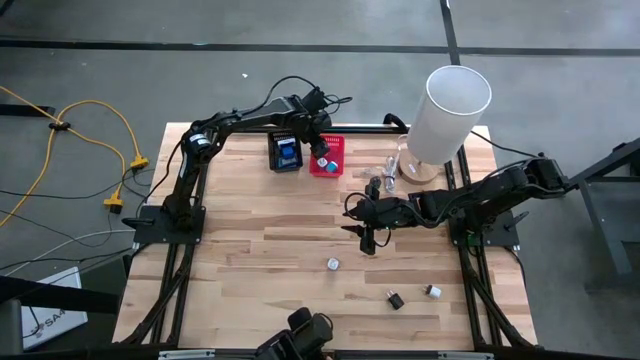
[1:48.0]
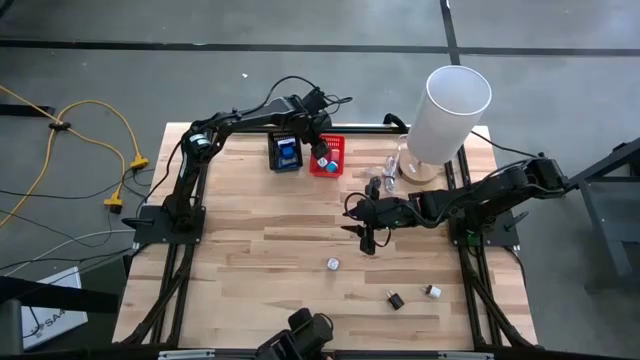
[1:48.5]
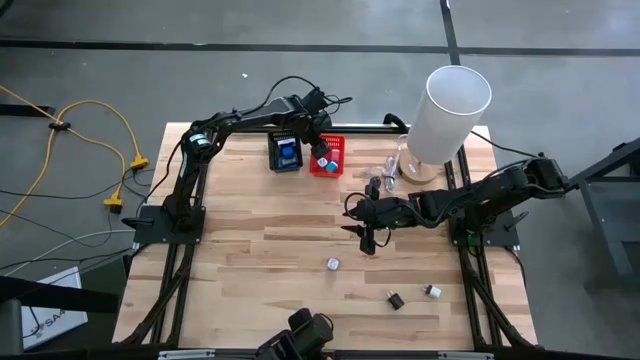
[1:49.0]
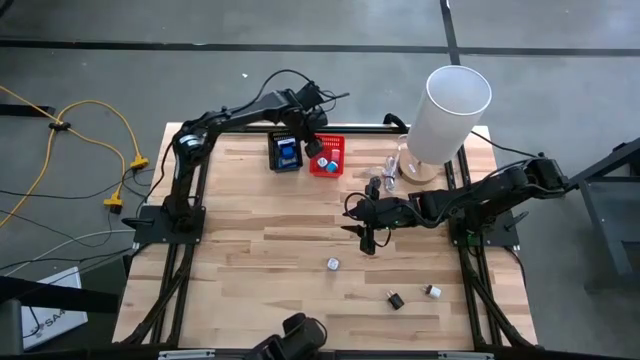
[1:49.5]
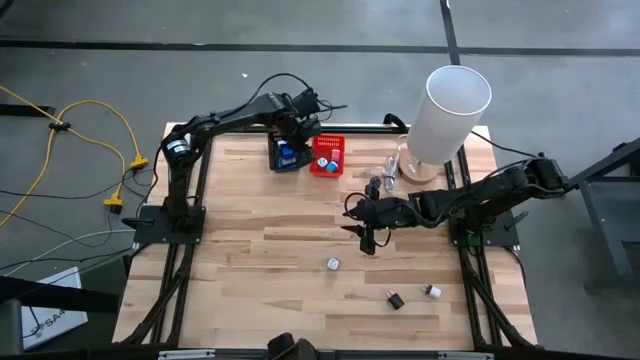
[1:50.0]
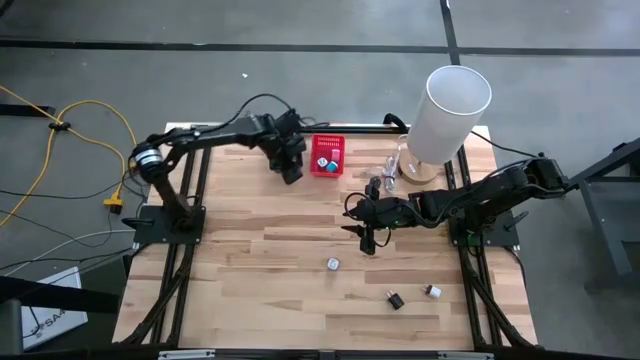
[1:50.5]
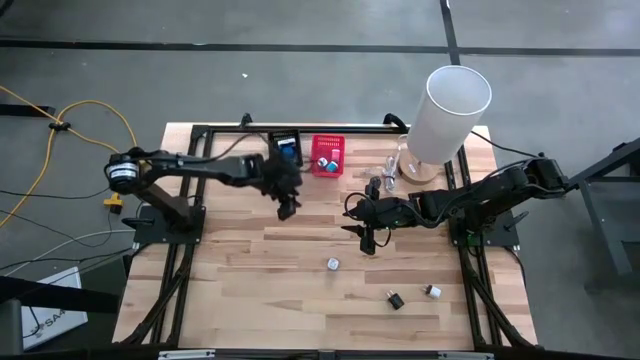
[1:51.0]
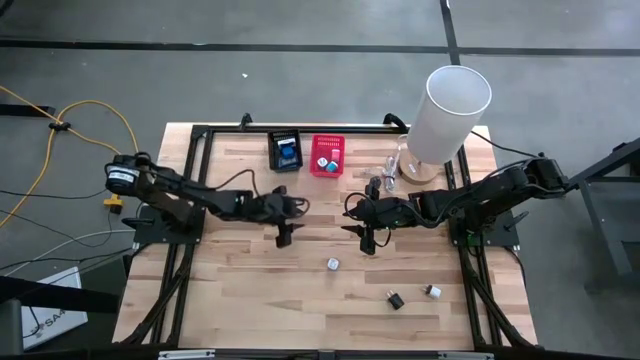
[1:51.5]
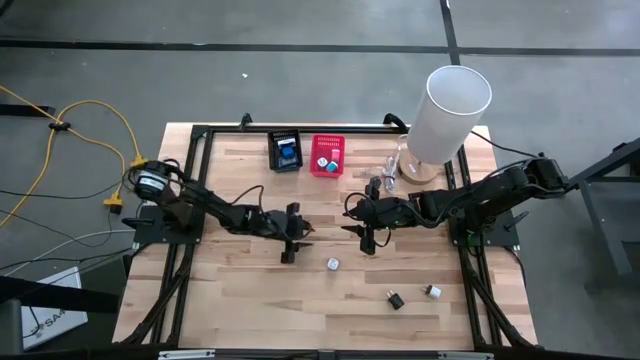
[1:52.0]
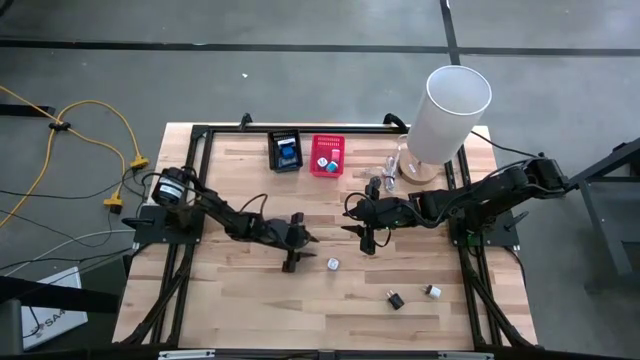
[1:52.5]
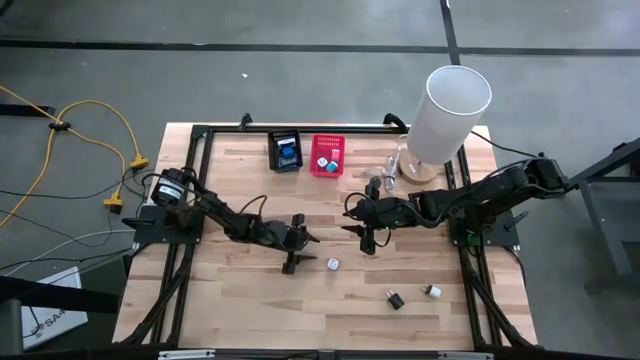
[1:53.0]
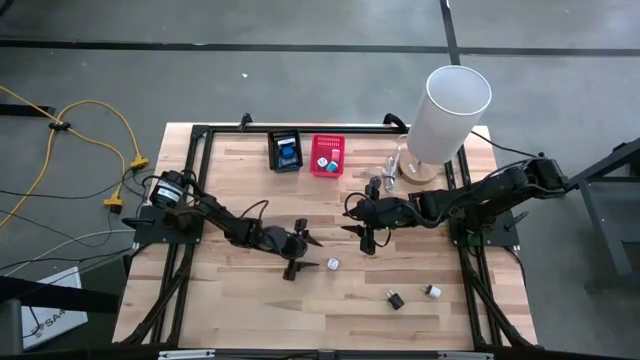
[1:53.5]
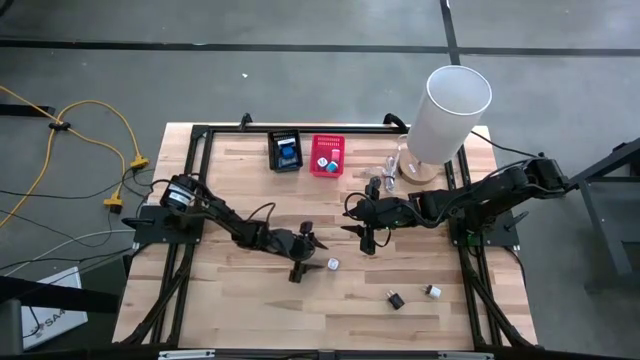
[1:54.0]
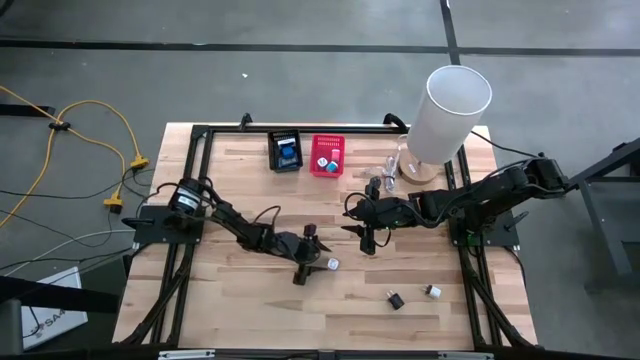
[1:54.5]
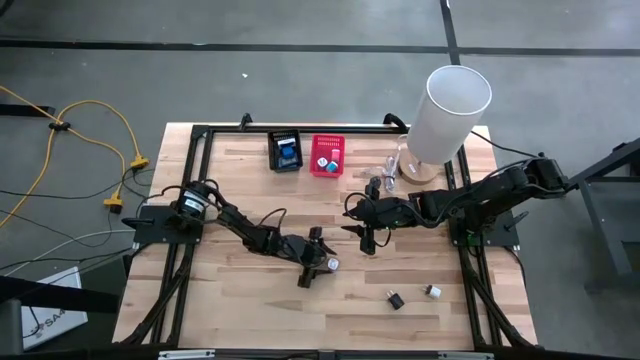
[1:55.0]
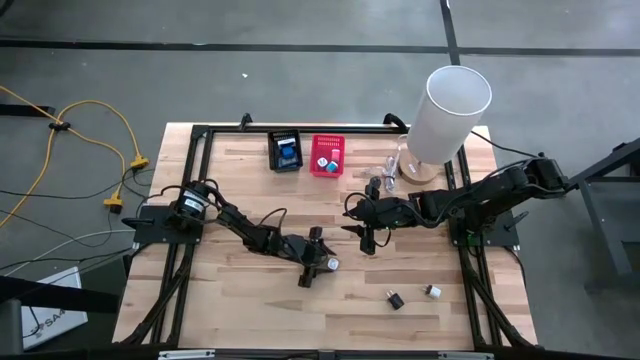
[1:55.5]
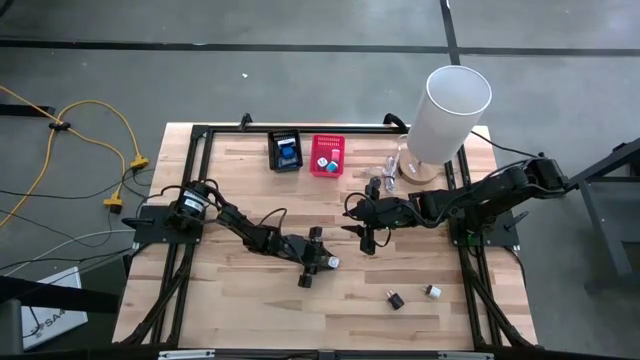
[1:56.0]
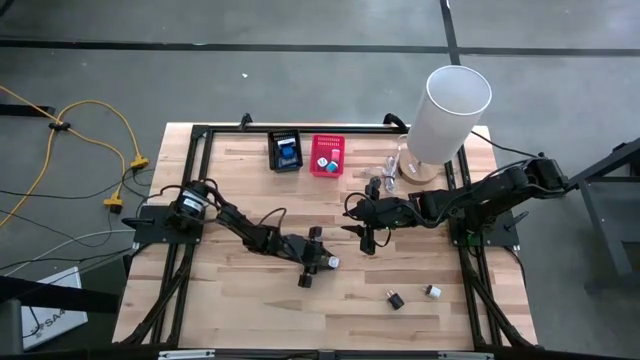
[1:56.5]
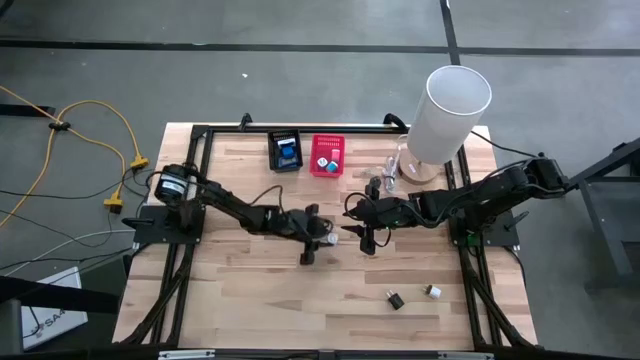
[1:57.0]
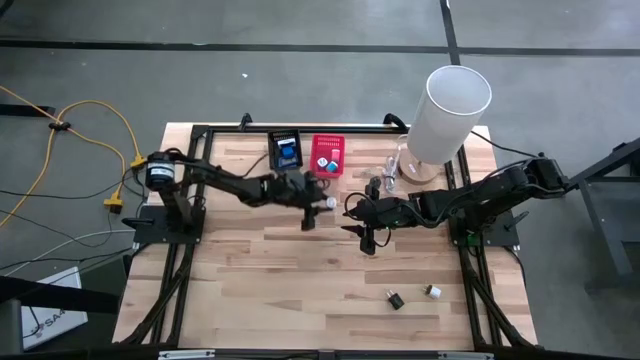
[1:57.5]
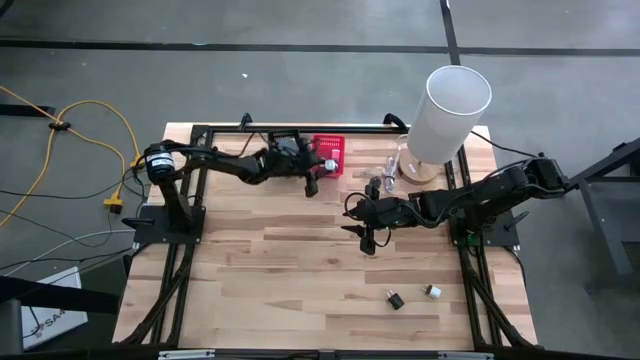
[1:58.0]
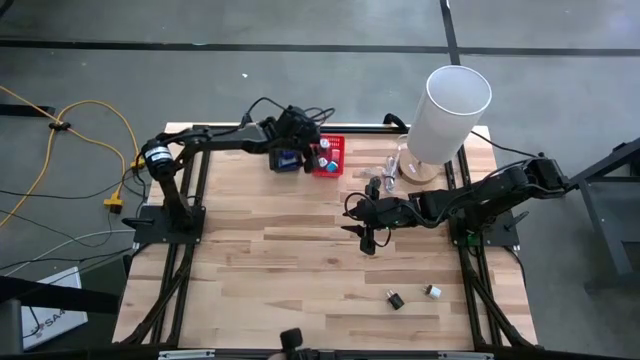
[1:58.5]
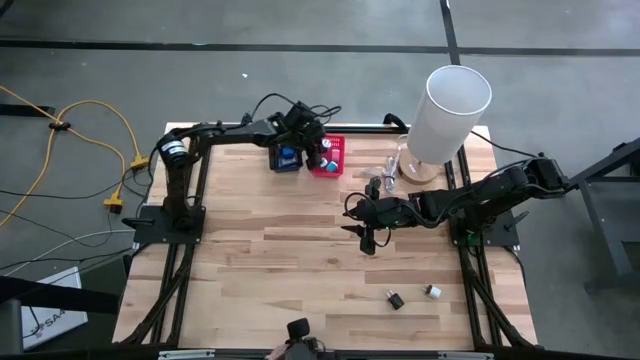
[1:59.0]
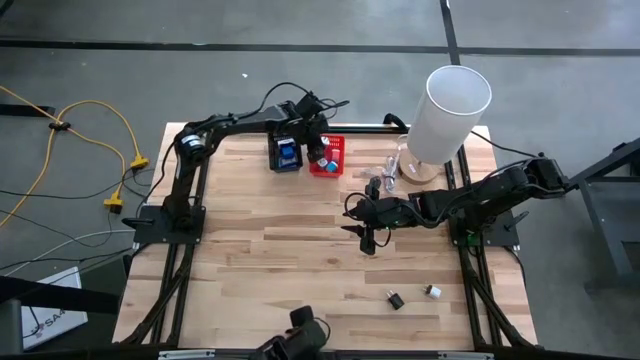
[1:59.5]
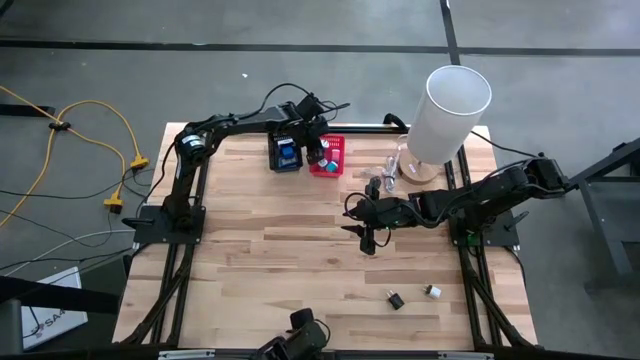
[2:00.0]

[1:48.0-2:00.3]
Task: Pick & Place Office items
Put the purple charger adapter into the red basket
